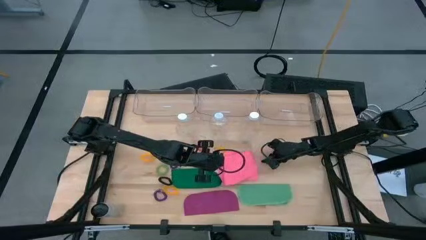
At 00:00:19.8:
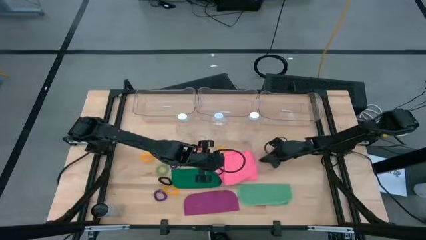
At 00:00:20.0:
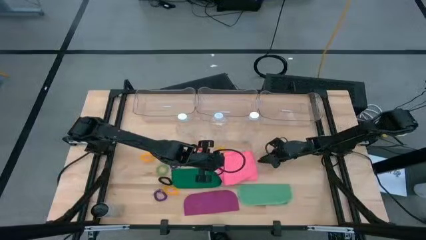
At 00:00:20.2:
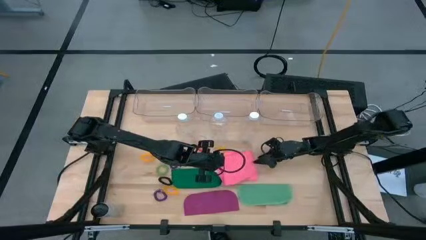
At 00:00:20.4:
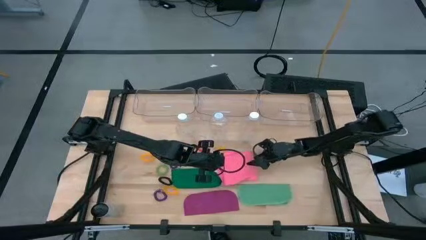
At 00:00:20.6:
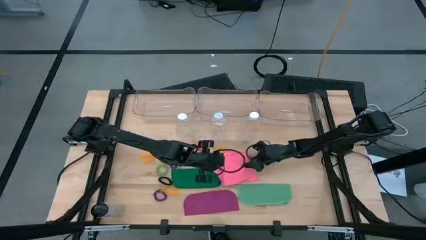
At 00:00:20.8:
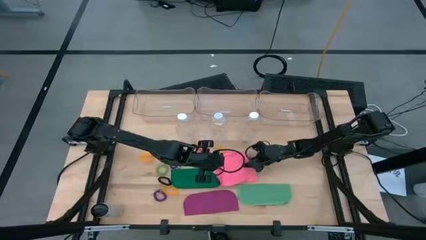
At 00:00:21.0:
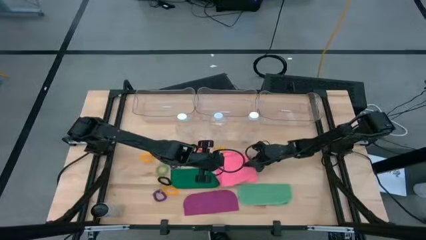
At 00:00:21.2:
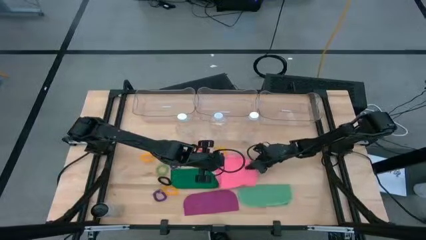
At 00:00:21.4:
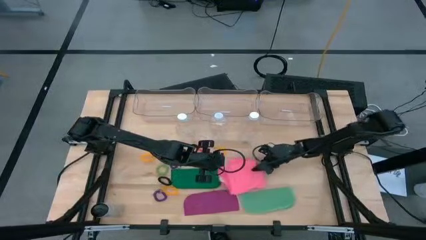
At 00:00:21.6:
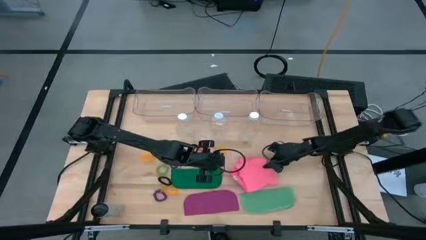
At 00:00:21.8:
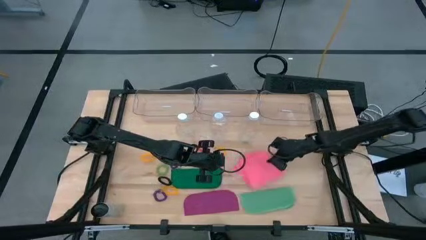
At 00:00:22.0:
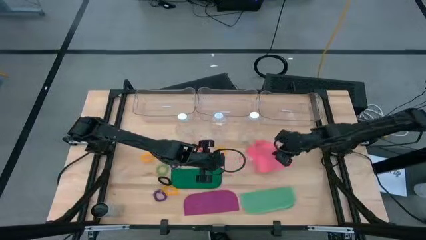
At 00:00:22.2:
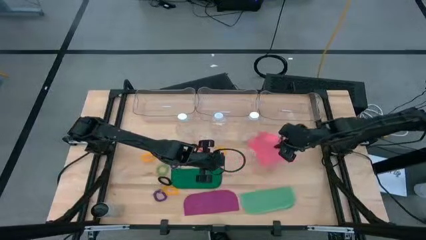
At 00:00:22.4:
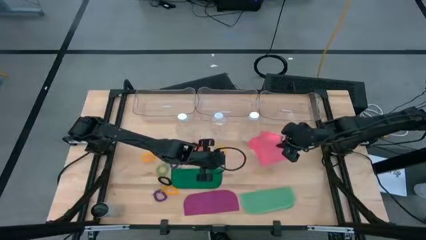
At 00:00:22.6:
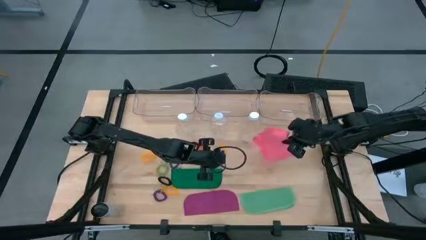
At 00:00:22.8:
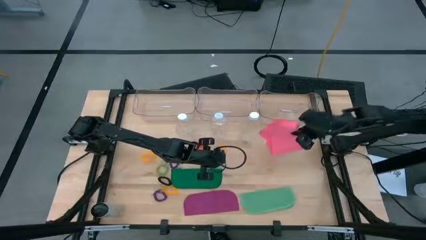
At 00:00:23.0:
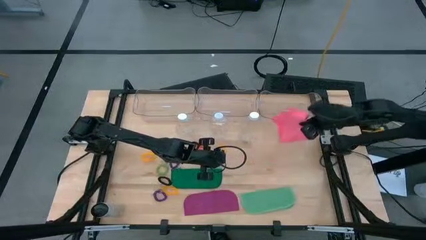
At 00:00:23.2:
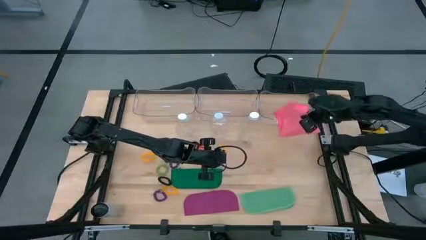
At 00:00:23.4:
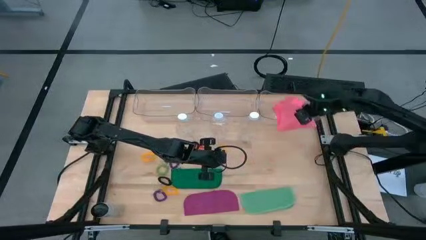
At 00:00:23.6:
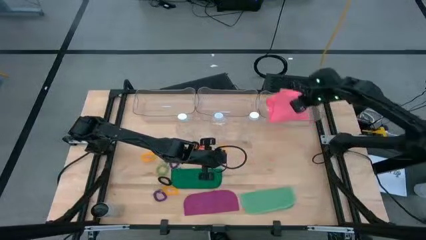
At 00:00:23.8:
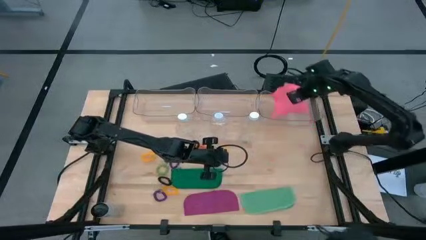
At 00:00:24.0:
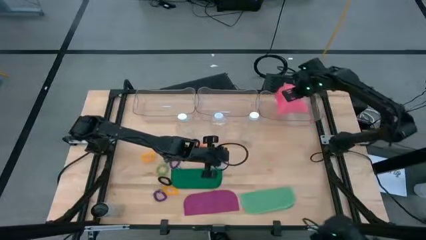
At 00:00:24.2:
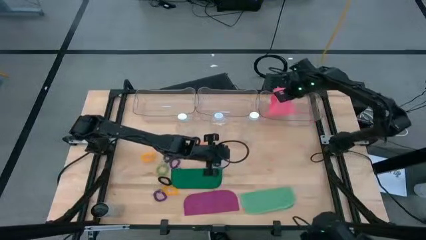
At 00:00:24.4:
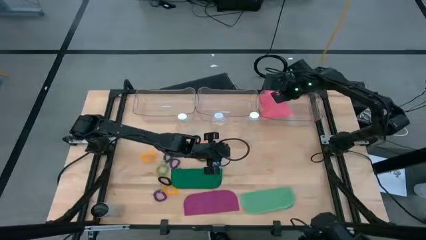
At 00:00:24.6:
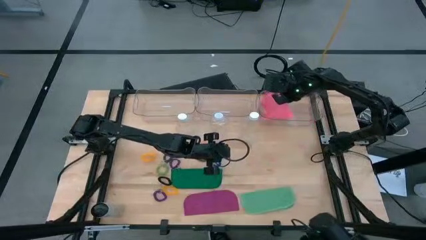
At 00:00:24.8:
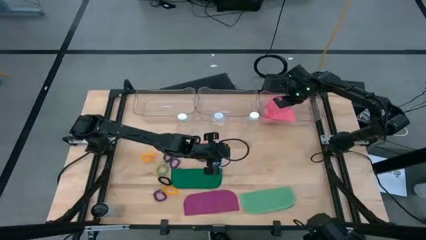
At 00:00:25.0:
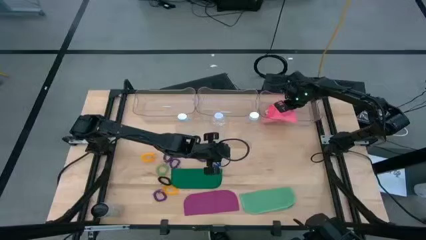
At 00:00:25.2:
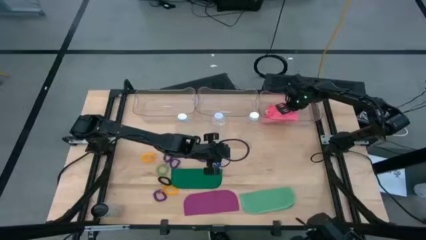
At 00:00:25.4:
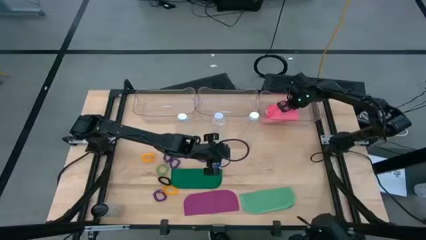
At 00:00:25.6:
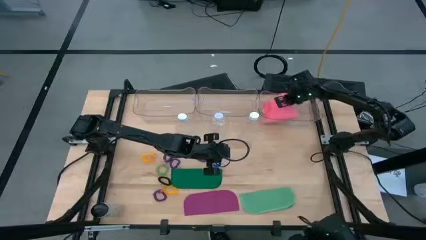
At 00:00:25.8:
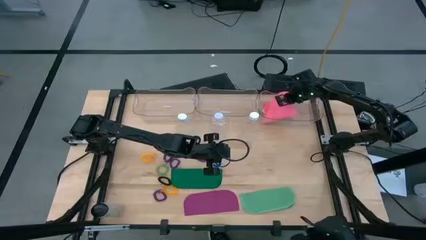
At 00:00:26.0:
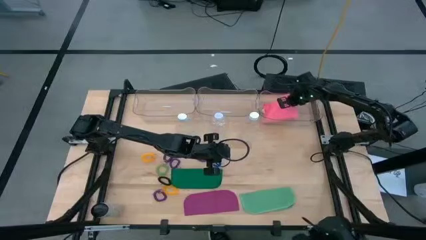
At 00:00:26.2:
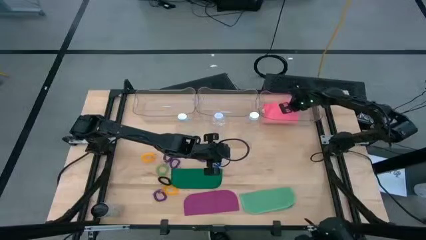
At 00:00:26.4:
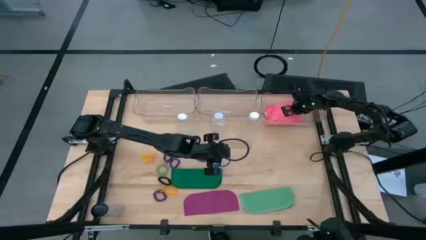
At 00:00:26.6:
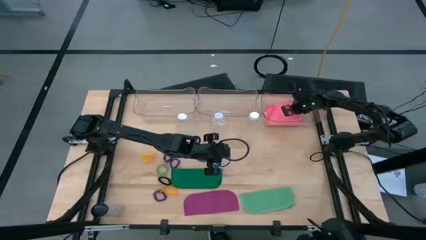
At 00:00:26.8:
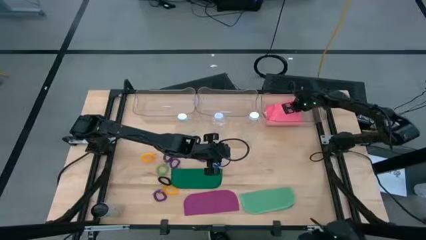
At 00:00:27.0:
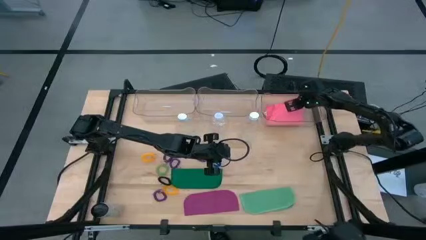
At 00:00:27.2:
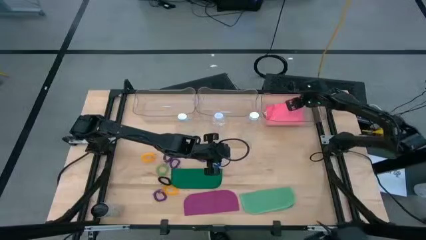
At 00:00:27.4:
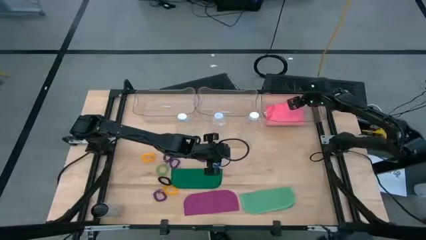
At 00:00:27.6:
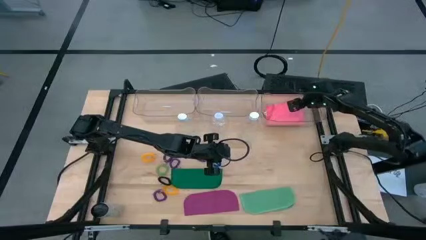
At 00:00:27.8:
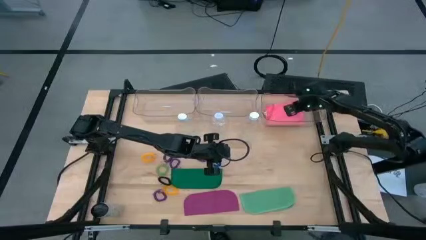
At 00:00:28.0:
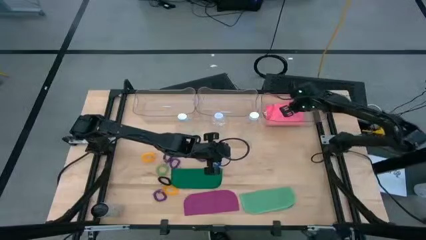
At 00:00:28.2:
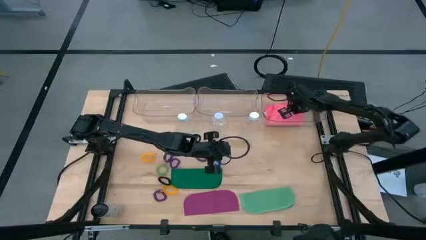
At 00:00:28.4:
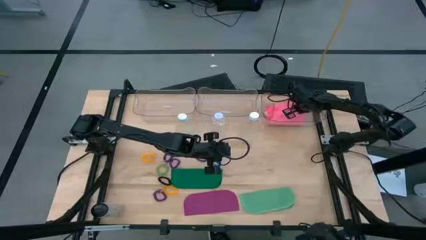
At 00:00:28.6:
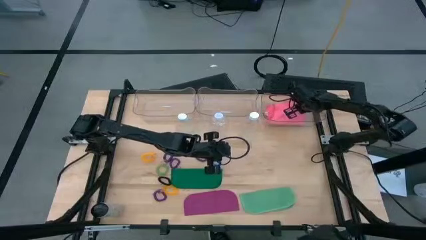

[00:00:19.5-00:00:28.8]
Task: Pick & Place Sports Items
Put the pink microfiber towel into the right transparent bin

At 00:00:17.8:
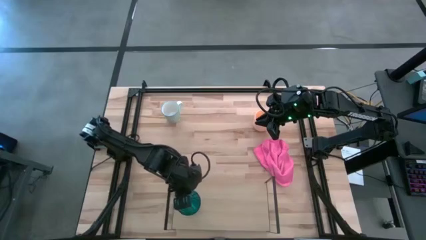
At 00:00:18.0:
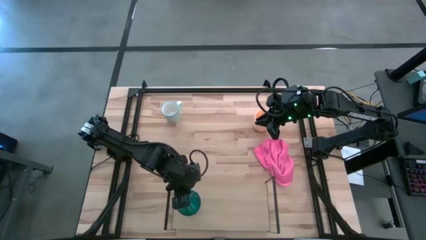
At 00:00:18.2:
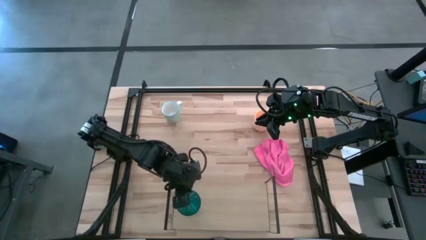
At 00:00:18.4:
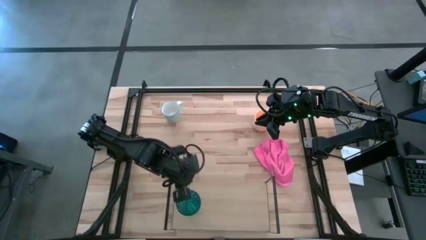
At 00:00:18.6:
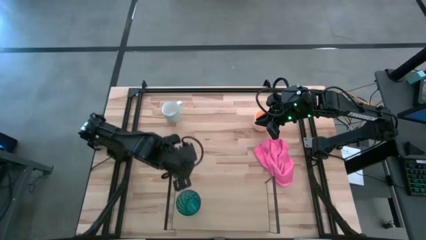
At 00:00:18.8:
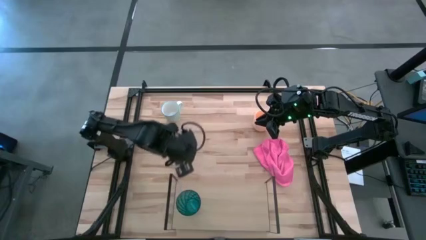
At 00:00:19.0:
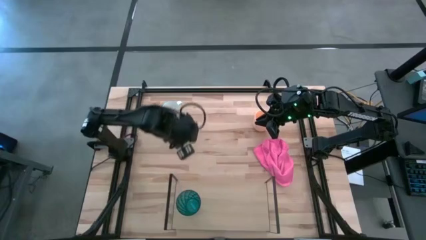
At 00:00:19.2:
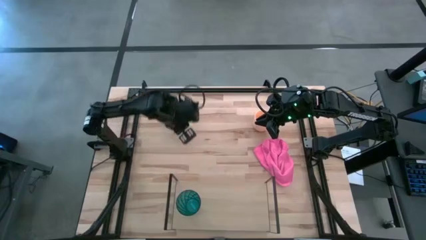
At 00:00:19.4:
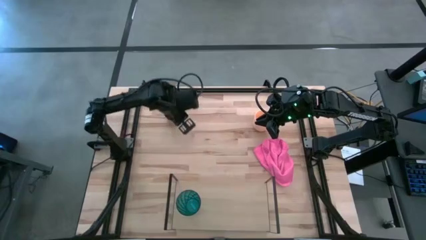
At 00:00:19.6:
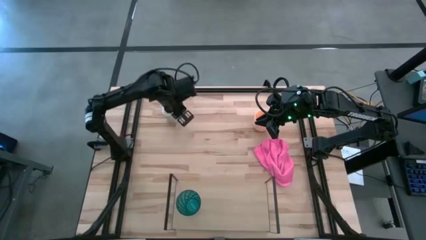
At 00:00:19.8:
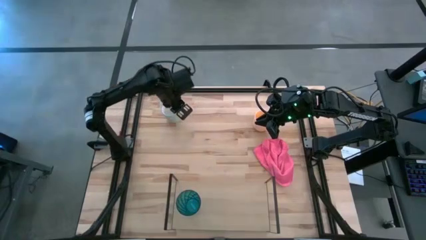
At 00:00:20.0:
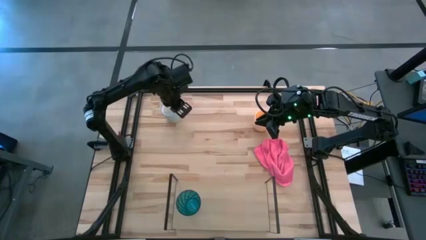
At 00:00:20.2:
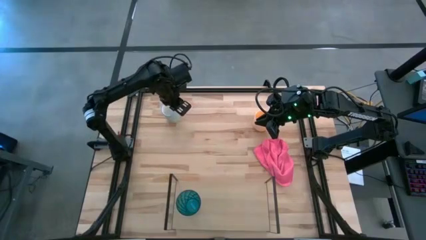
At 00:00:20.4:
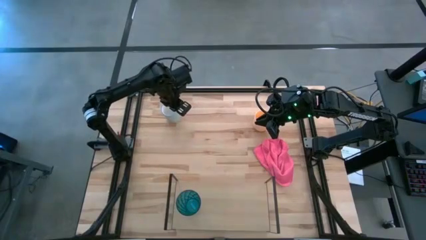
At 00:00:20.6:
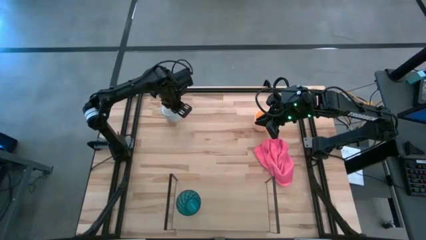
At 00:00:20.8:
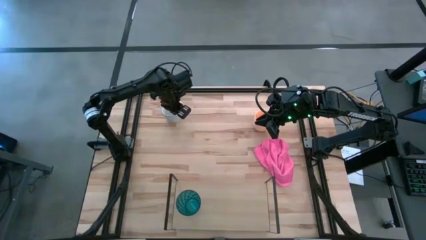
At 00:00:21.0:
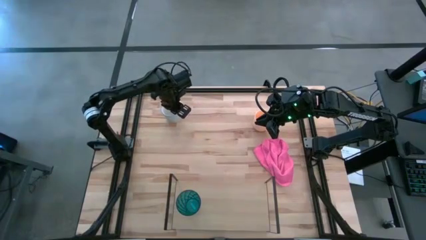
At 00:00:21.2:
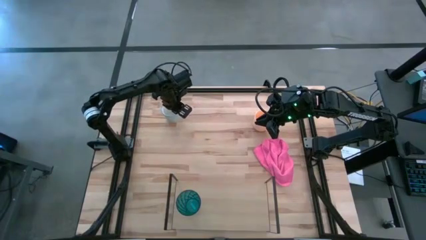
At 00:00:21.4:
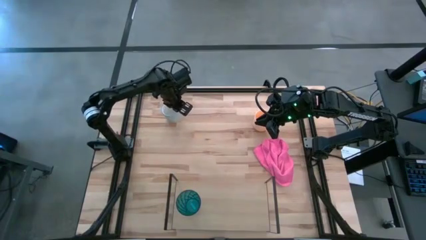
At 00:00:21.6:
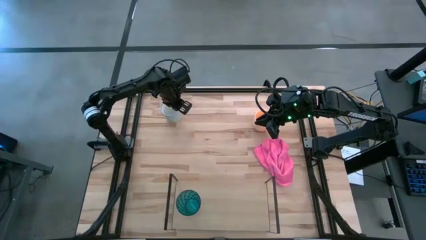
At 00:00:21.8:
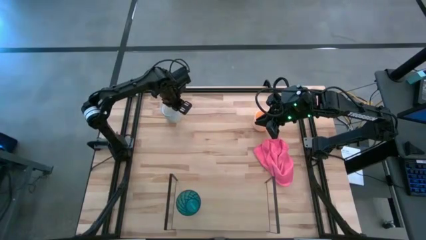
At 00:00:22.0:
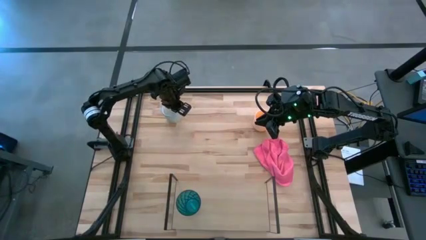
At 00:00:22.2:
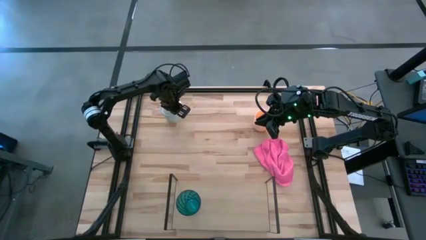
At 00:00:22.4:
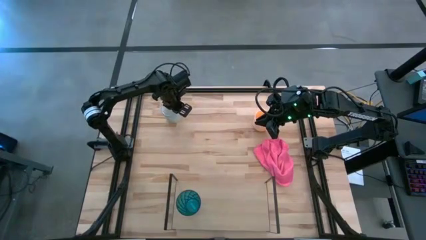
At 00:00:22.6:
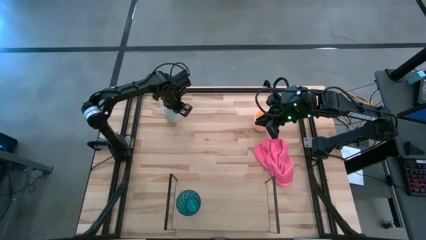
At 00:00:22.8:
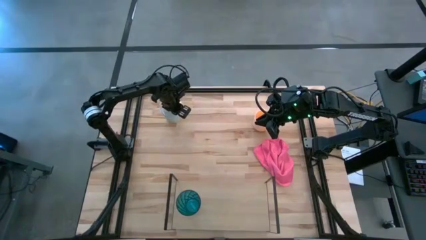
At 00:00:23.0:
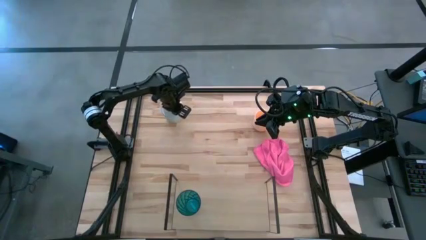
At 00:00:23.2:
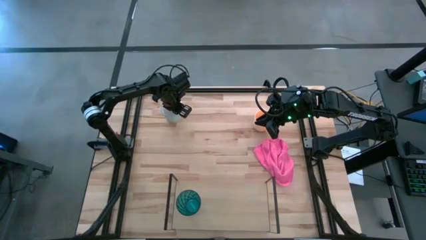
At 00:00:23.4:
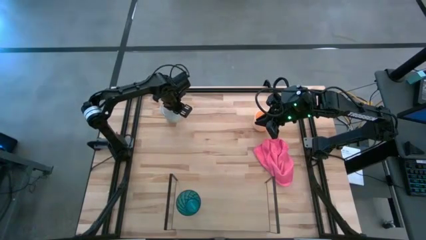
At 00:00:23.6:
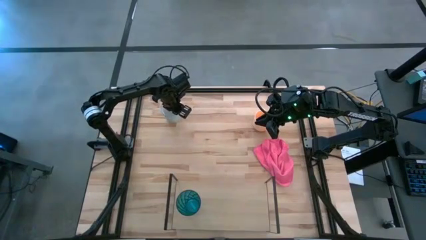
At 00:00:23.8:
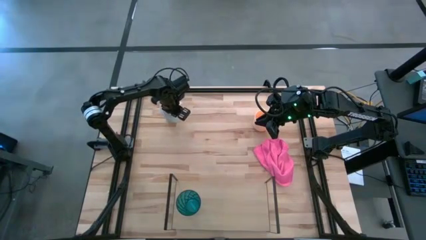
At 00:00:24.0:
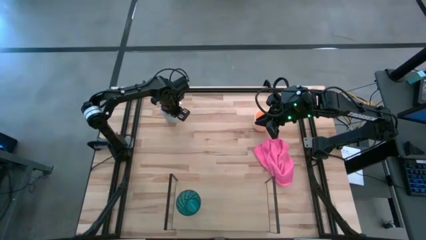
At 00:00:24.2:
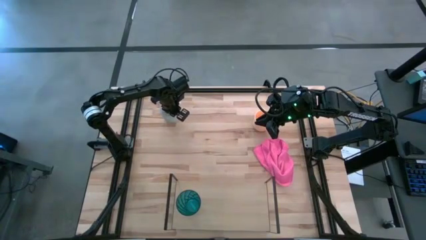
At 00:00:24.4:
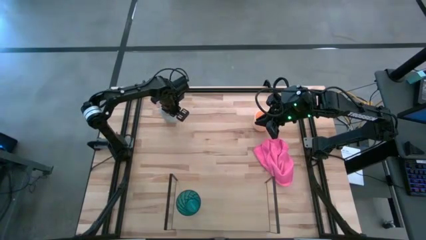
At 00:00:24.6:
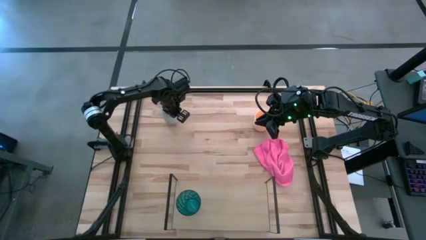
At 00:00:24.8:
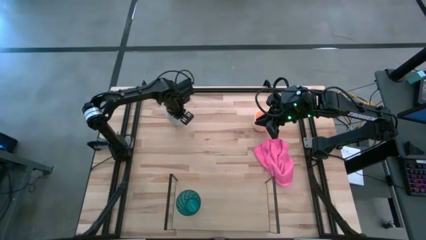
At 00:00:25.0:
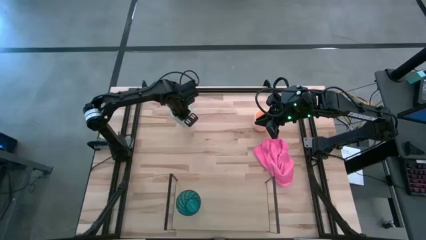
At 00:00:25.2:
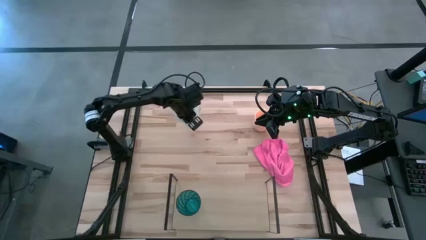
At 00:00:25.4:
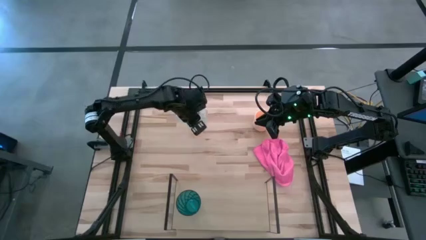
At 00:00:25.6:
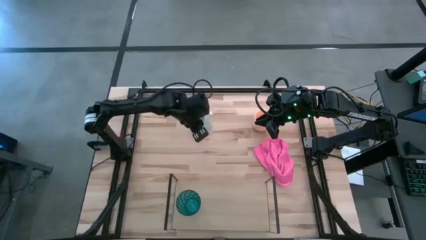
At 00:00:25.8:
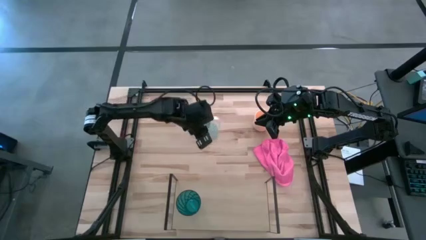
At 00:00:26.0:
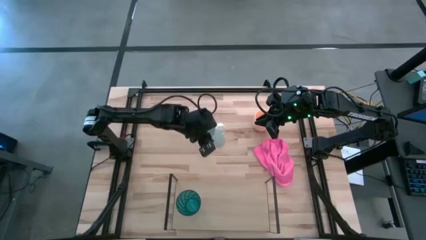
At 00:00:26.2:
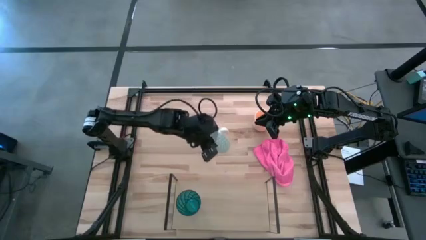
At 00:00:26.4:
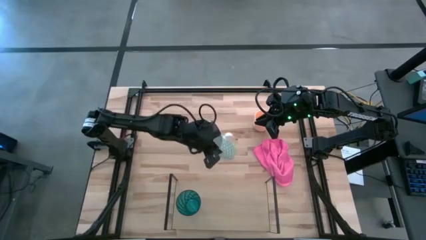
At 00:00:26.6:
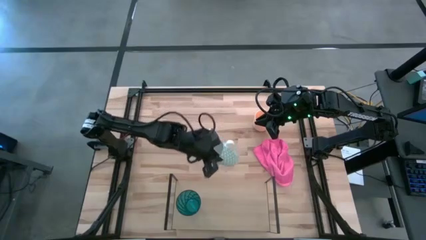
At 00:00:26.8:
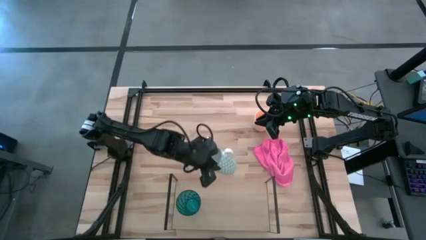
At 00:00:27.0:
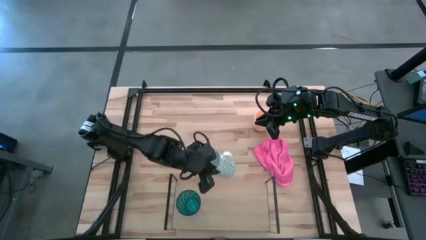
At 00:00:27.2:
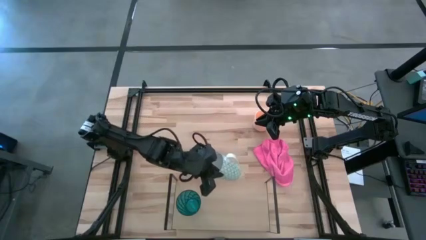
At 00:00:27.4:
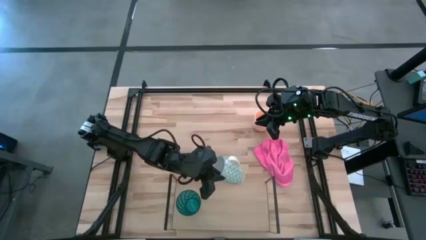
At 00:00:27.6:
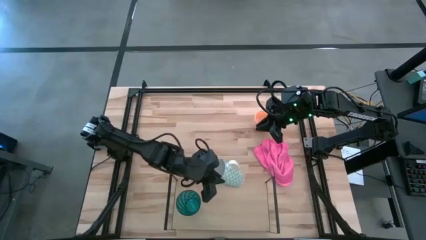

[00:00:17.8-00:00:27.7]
Task: Stack small to large cups/mugs on shelf
Put the white mug on the shelf
